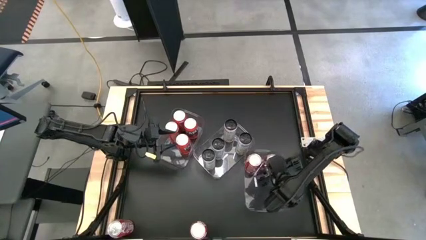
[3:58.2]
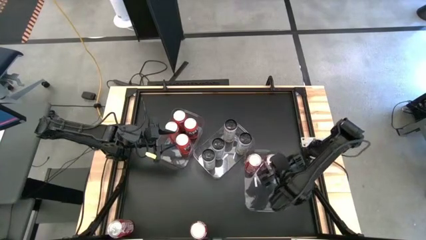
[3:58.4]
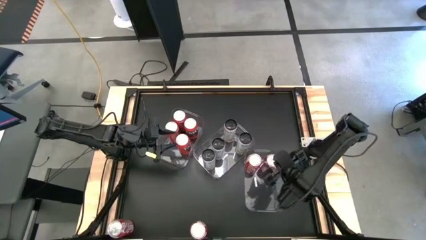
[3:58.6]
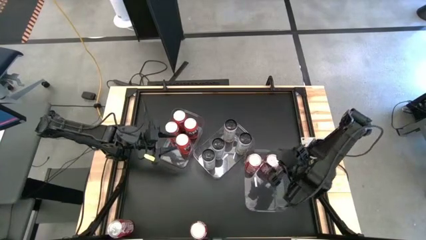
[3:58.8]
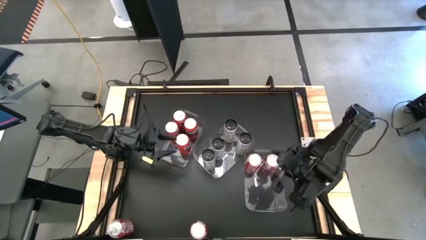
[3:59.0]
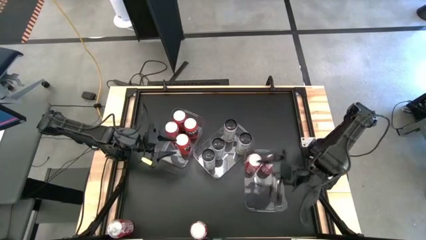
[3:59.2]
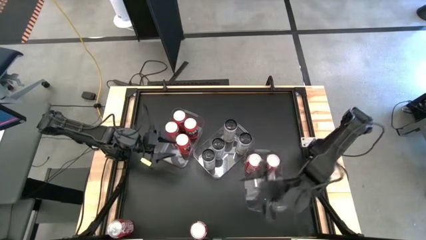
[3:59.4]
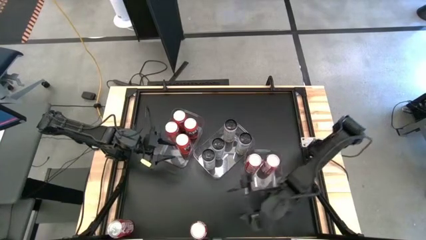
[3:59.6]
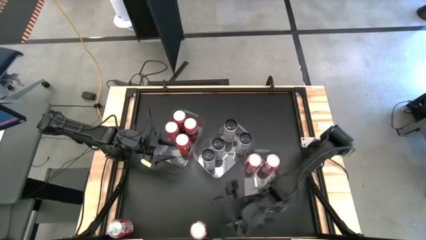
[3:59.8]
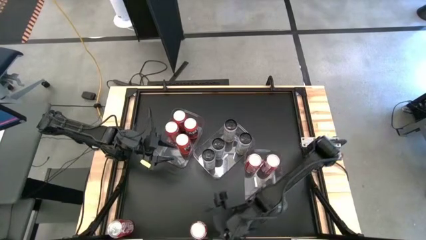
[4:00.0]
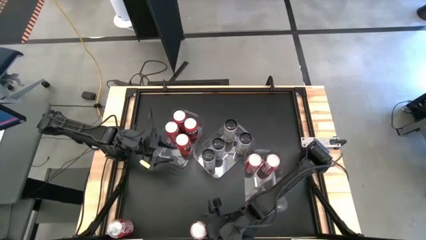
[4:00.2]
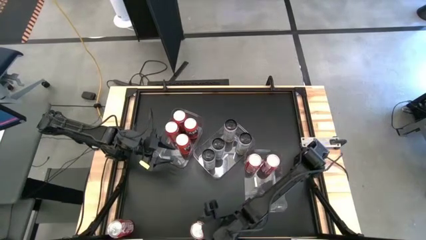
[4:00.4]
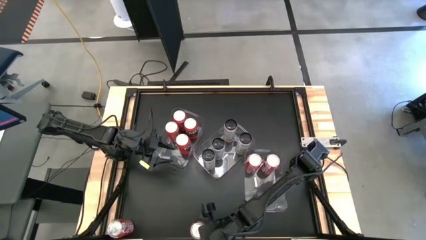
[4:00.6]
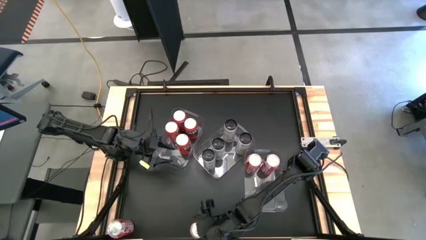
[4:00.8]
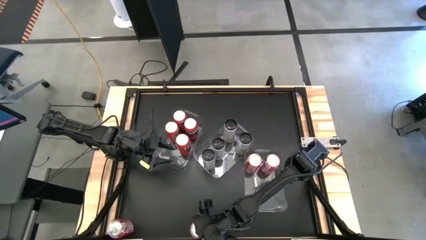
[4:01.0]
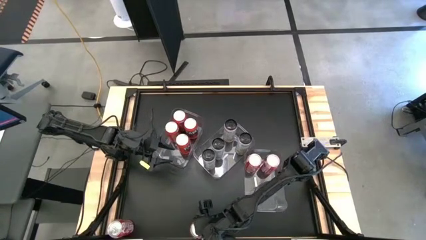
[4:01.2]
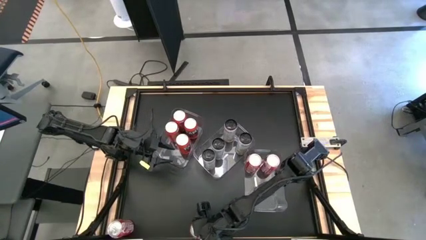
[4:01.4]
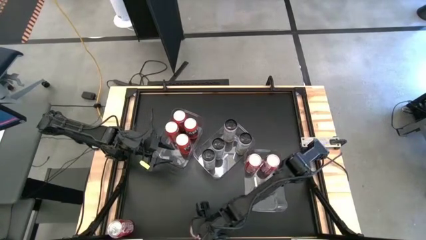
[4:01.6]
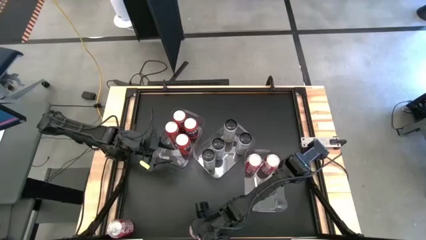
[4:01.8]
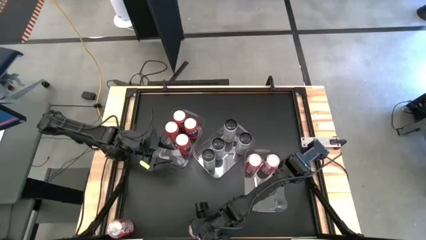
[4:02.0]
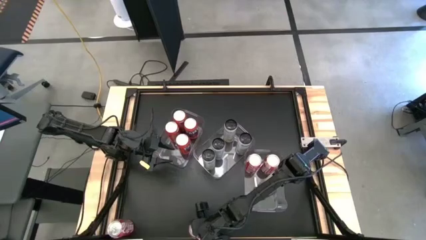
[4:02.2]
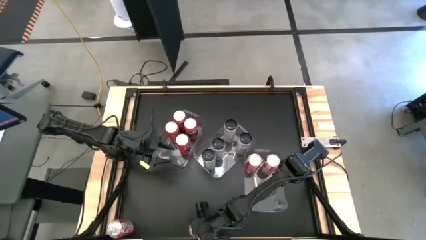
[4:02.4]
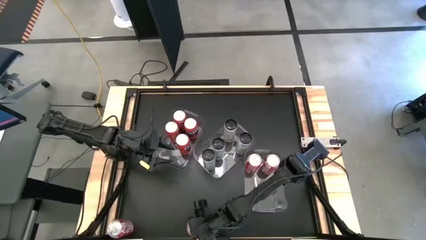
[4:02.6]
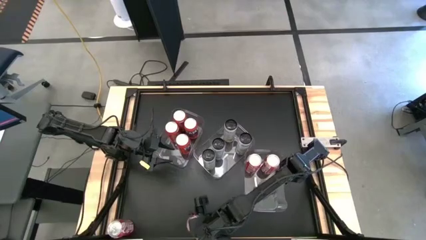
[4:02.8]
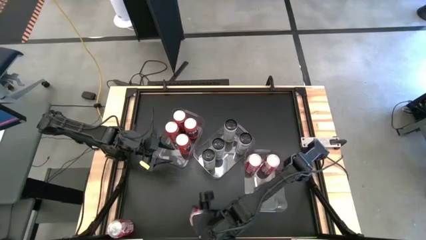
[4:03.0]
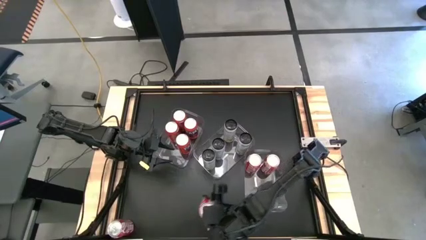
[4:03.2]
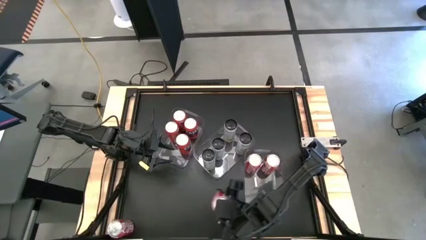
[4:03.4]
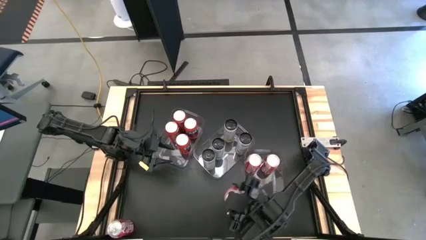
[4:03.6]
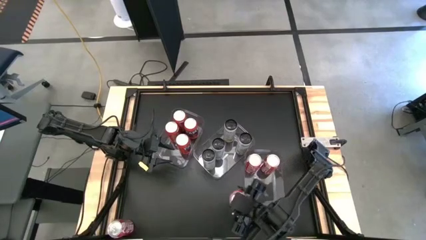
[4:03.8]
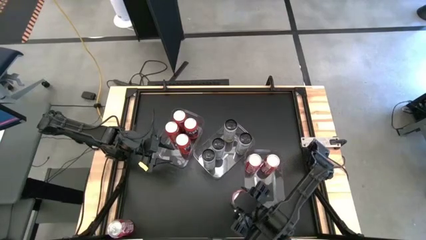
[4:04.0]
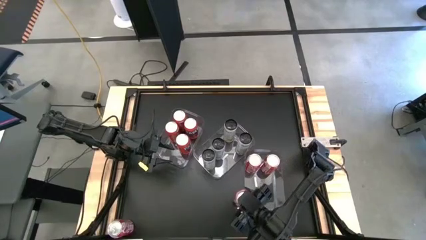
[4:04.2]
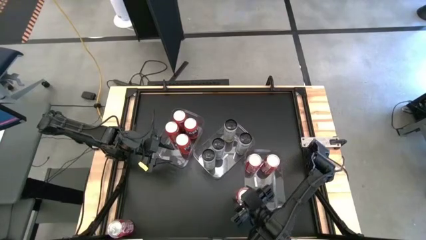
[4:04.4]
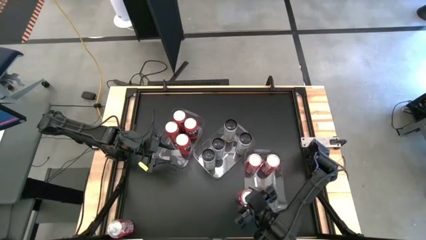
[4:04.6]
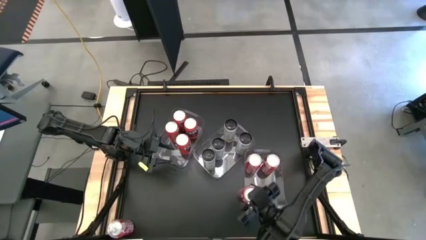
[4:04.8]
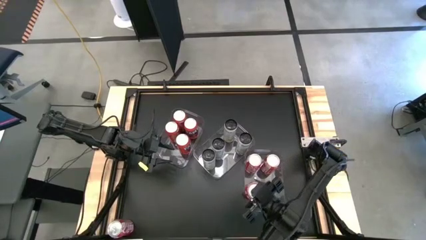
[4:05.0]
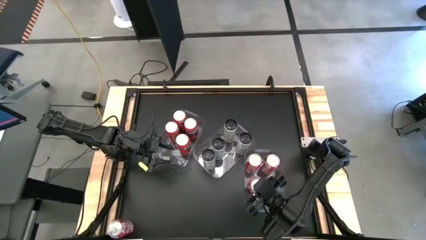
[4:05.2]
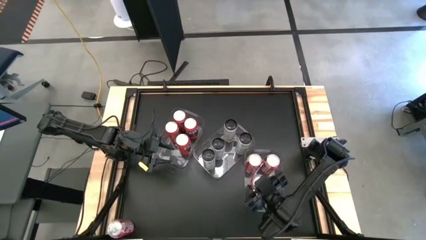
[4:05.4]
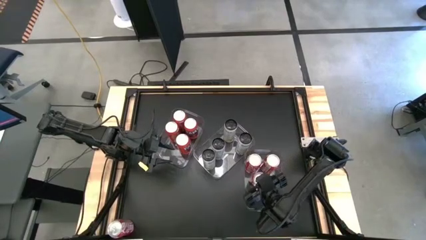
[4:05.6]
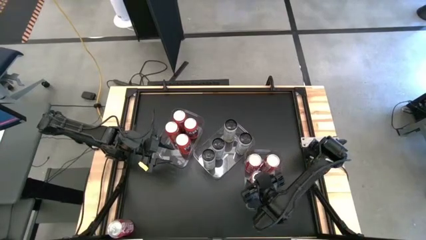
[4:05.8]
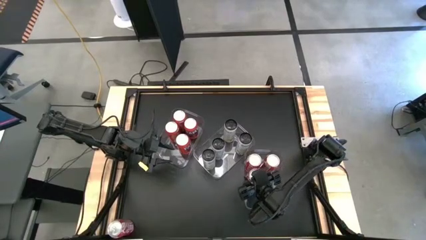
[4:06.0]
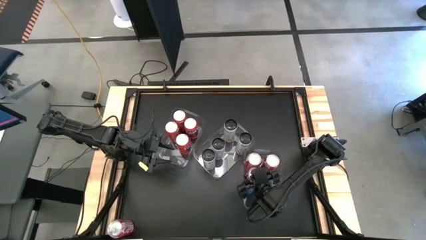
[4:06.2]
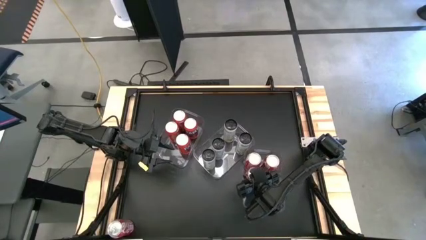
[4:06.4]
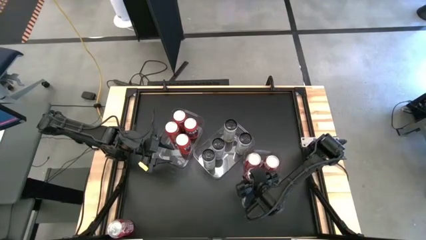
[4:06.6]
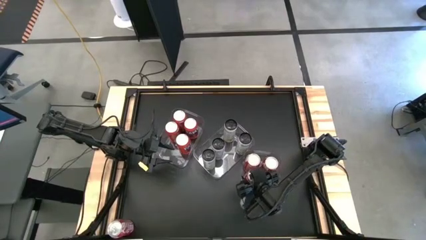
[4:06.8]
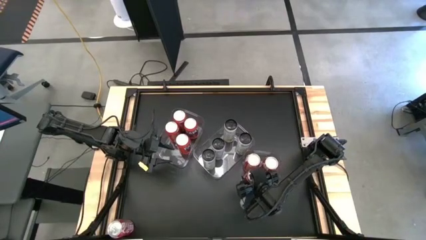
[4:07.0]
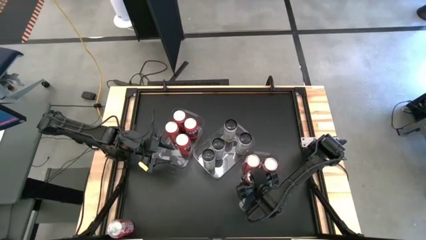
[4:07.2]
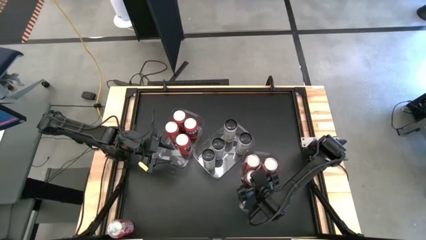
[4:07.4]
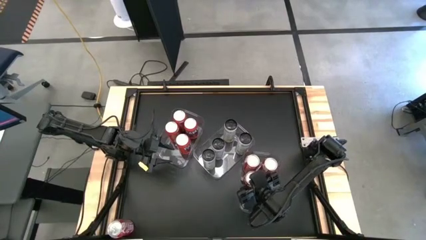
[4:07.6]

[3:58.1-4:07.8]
Task: Sort soda cans
Put the red soda can into the right transparent bin

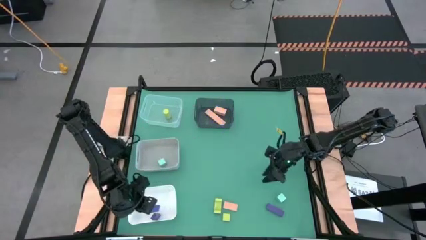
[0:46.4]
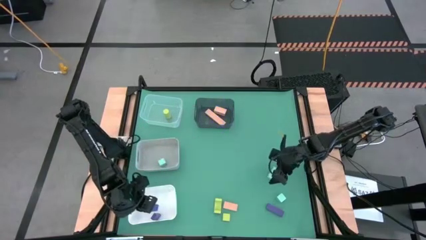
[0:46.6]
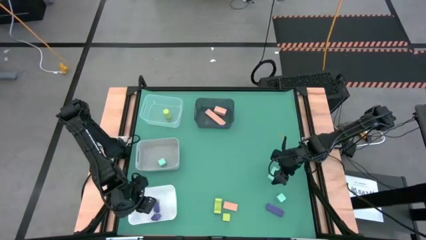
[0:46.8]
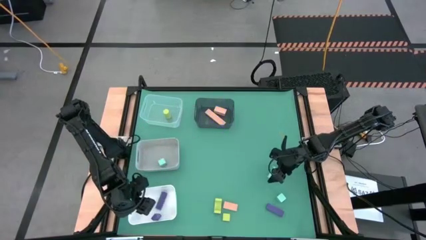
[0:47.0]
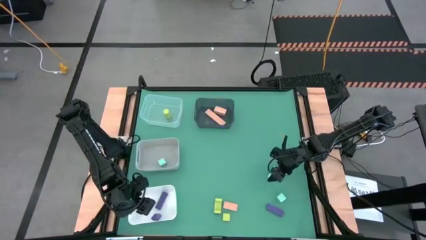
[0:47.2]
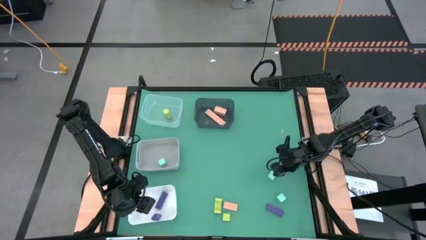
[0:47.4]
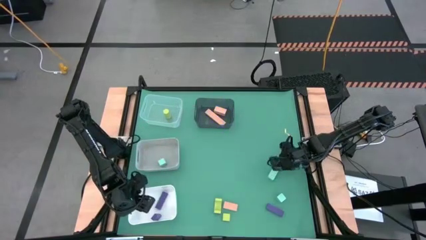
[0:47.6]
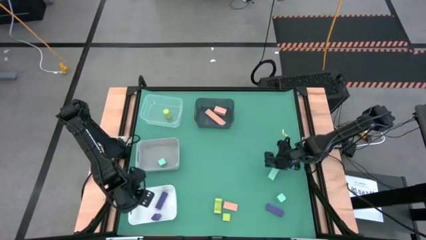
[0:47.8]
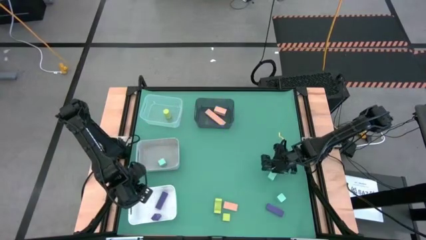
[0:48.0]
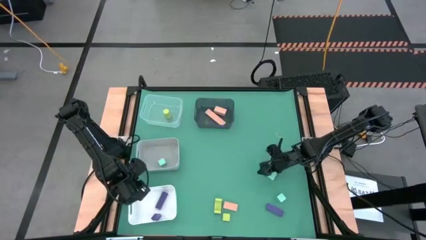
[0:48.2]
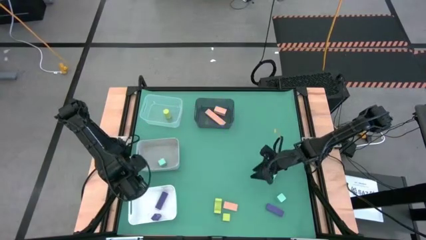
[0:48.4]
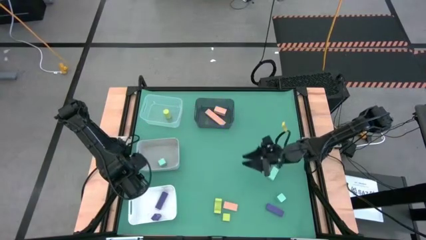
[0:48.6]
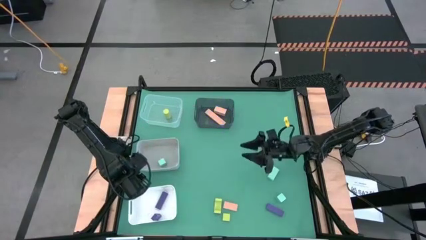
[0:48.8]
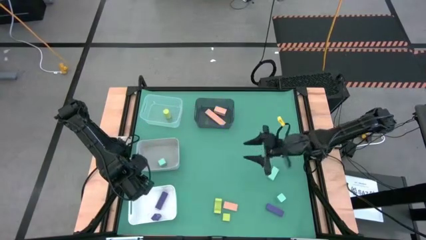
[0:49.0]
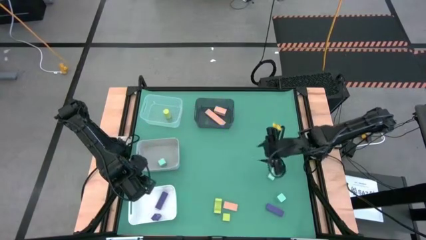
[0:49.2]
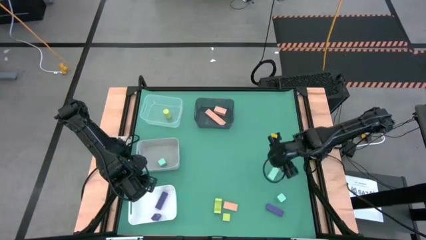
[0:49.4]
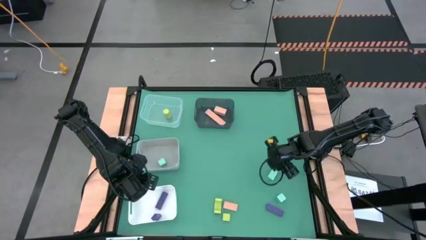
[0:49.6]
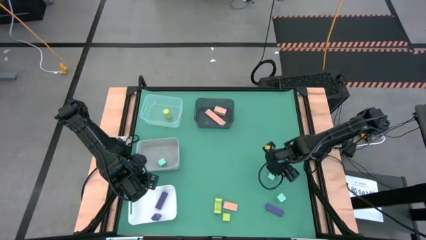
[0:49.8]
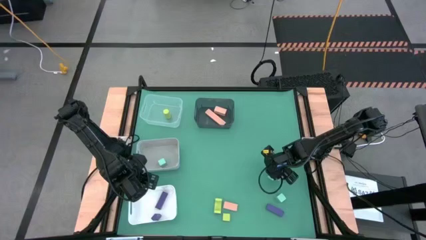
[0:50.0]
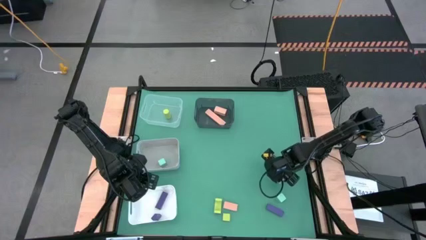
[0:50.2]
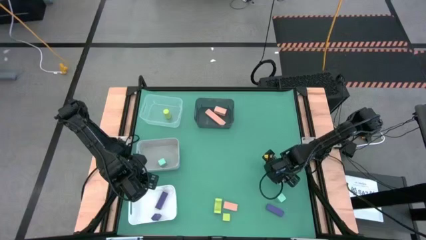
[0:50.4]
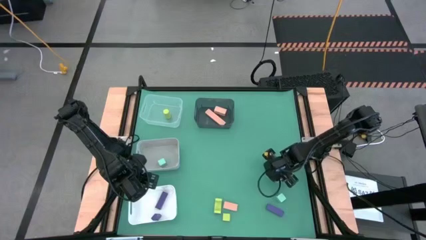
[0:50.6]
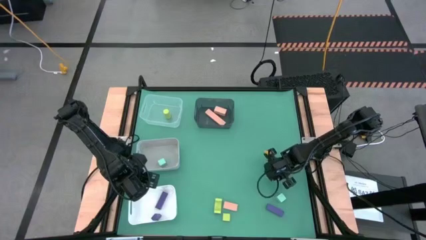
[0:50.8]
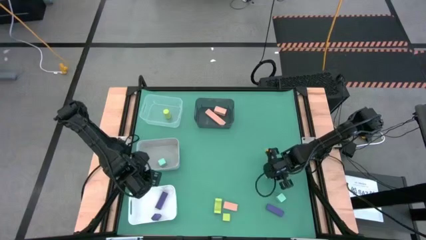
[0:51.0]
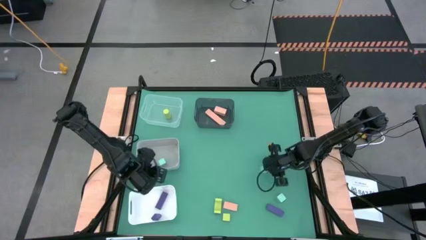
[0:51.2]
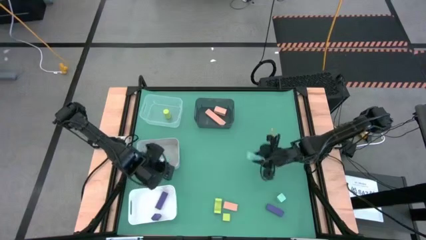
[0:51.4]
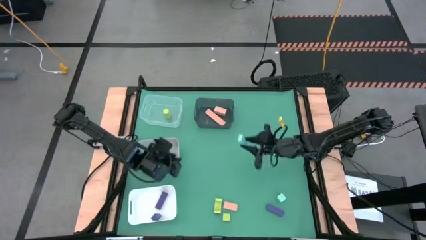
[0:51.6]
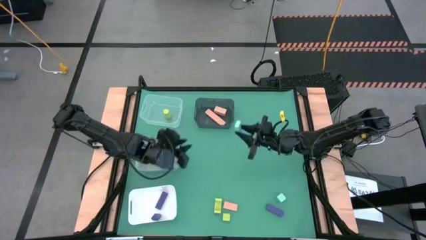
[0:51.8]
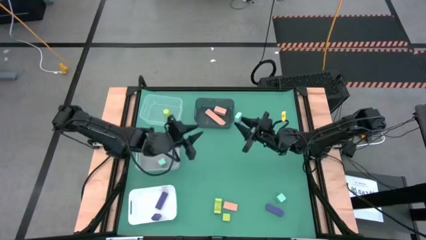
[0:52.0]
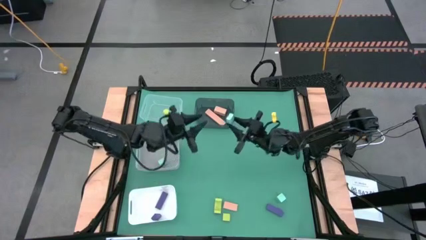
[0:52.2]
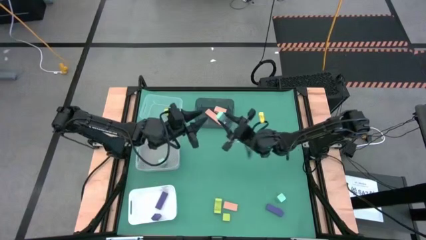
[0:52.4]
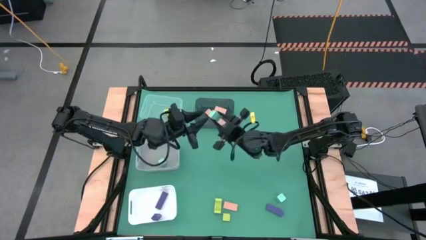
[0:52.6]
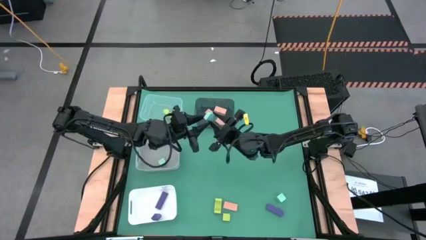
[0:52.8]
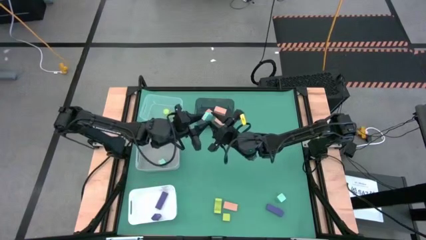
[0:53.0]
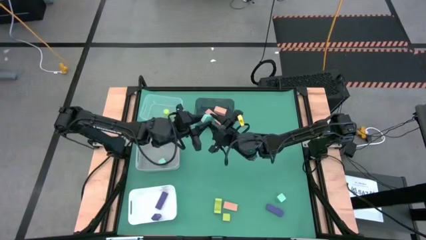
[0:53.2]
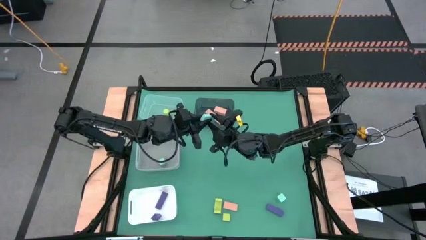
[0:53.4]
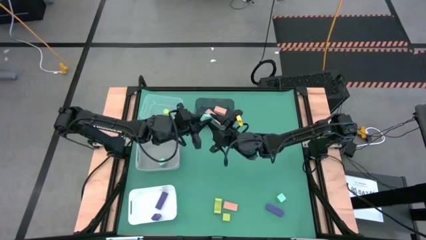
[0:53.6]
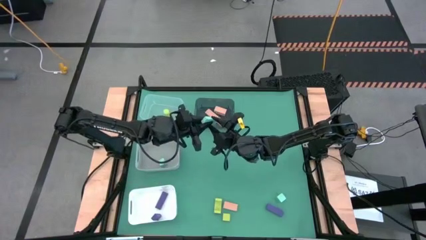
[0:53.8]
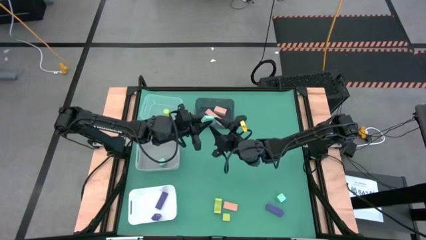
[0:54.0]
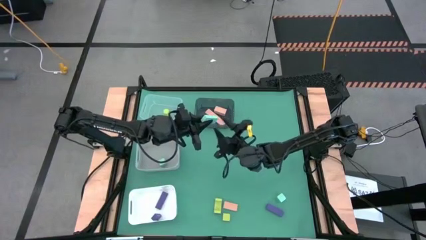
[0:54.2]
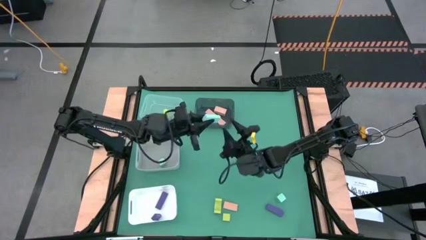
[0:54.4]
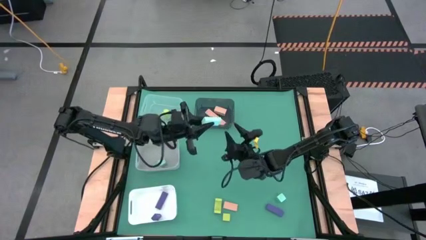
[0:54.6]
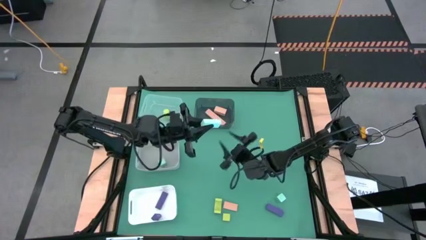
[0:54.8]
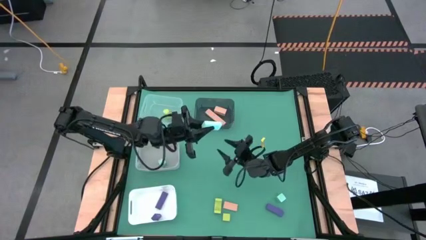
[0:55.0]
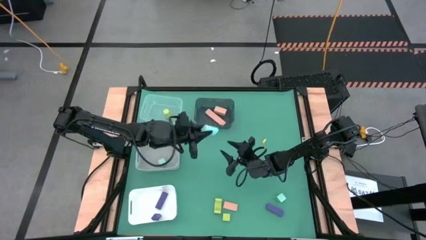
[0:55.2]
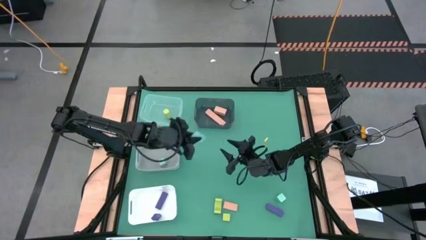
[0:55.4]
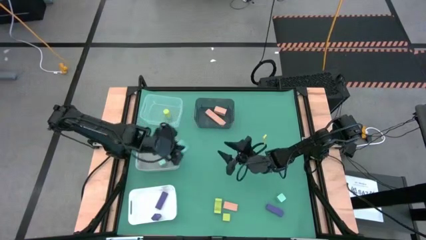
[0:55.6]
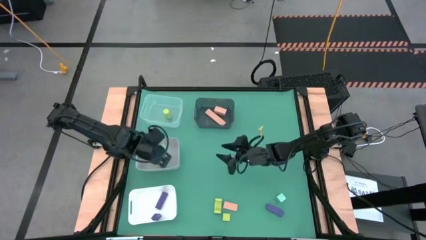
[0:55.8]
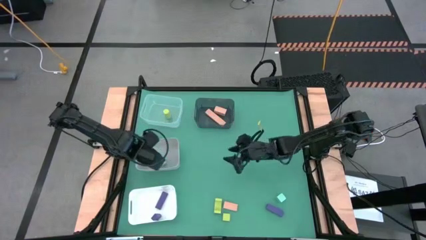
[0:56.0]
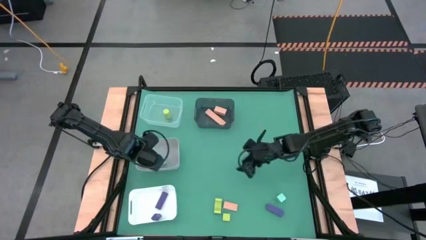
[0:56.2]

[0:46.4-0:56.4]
Task: Sort & place blocks by color
Put the top blue block into the dark white bin
